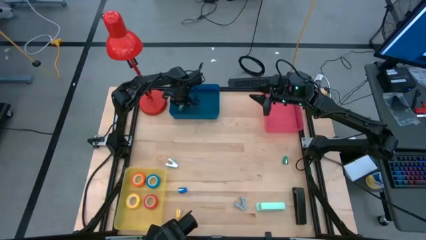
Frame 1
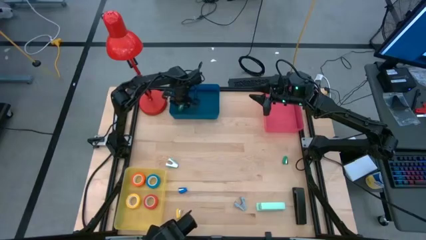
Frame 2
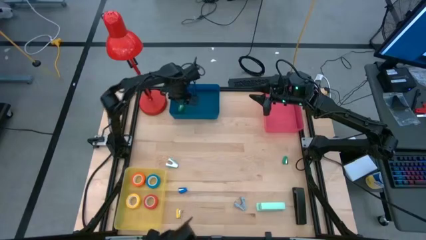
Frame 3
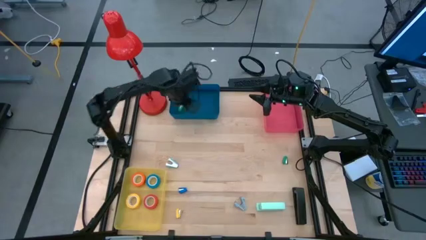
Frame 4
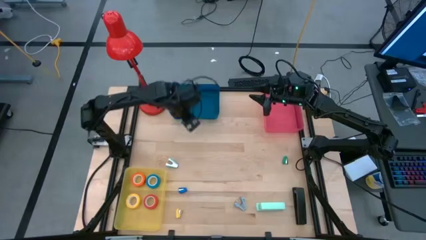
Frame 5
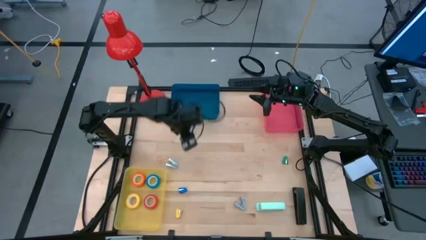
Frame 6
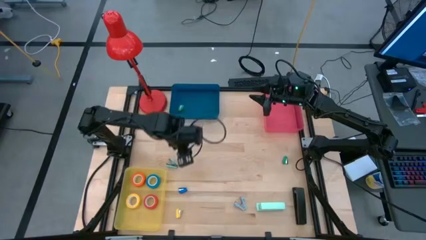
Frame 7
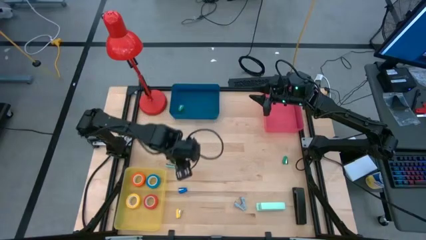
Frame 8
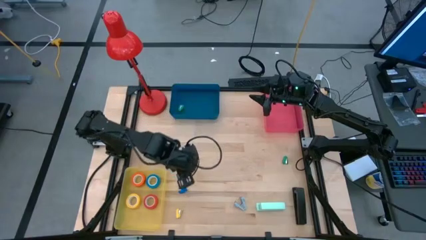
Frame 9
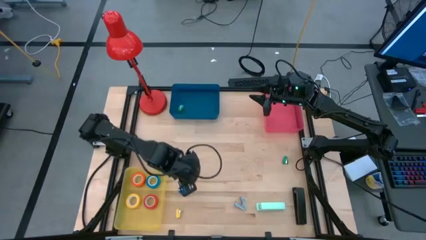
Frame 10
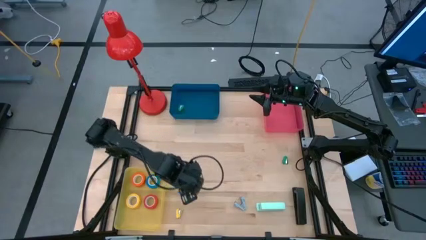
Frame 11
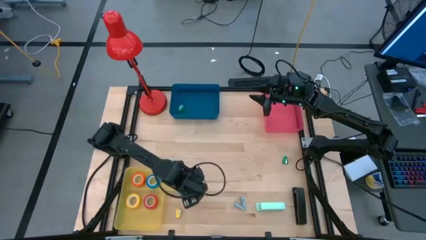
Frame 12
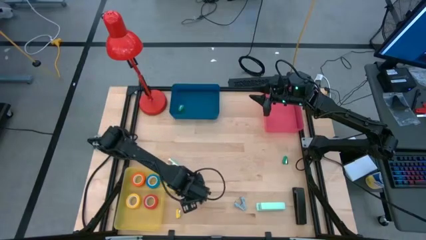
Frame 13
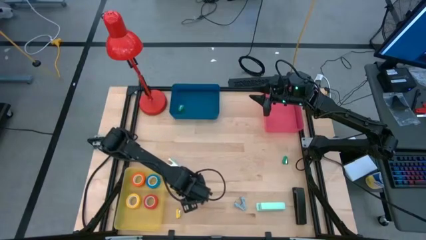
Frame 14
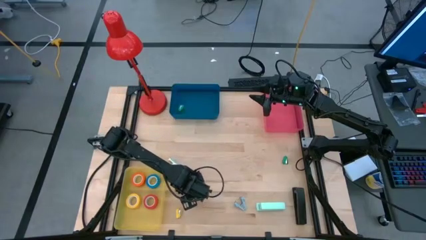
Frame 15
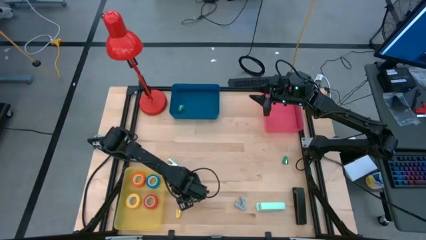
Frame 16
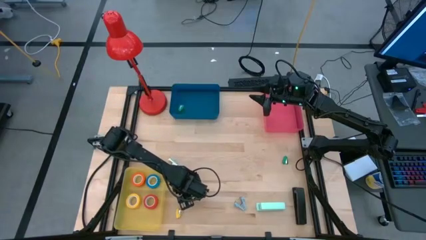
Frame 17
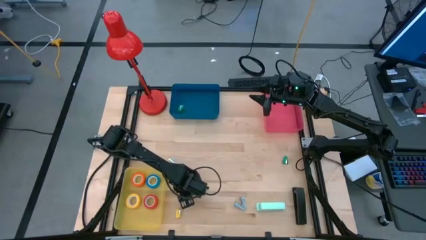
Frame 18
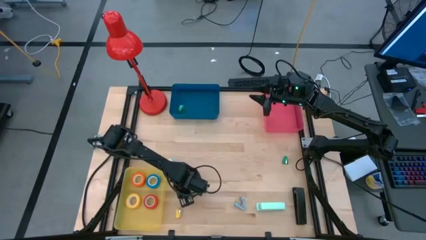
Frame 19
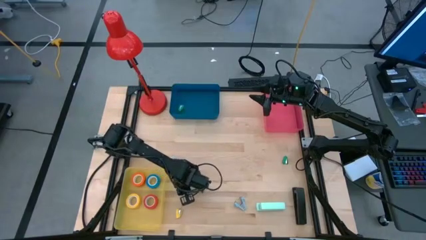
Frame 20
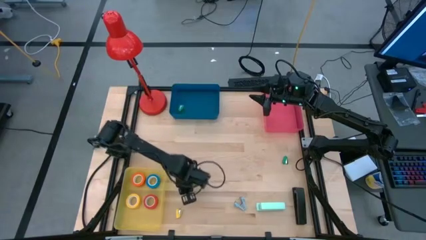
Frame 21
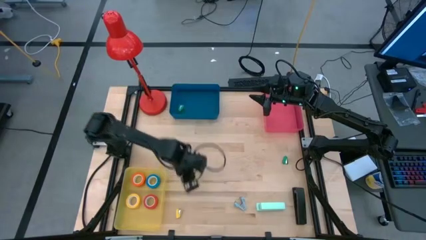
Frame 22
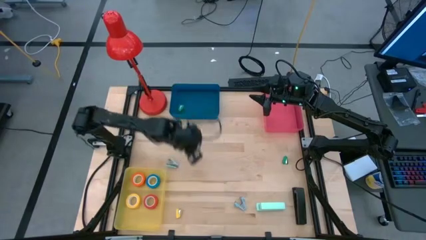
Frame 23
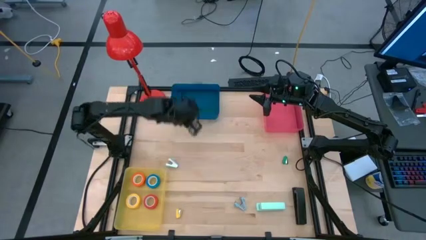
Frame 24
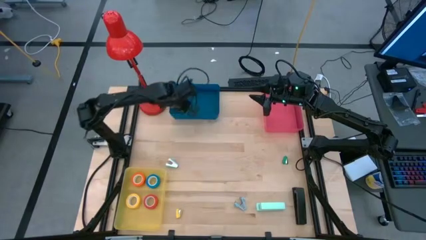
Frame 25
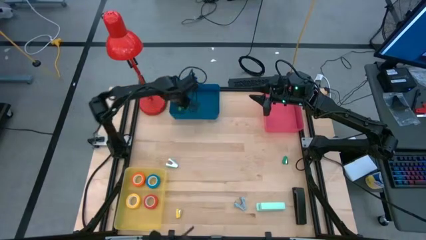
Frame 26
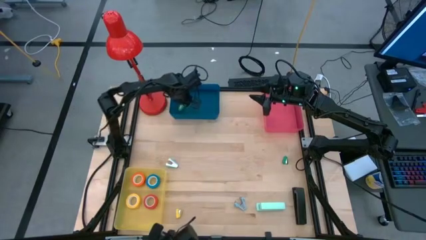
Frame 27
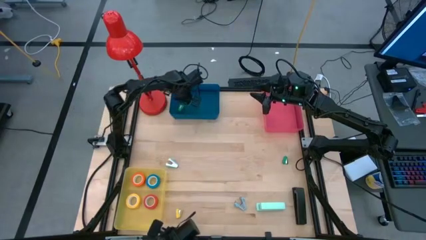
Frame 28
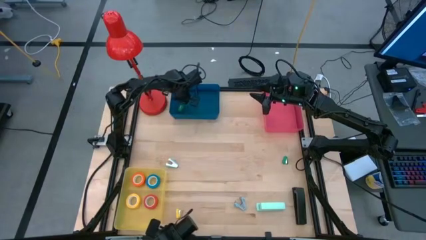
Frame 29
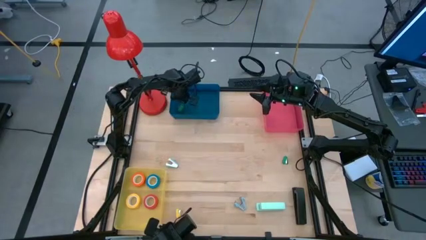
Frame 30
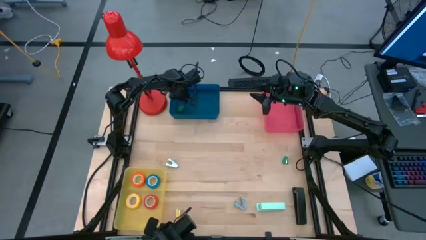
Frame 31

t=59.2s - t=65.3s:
Task: Pick and place Stapler, Stapler remover, tape
Put the blue stapler into the blue bin

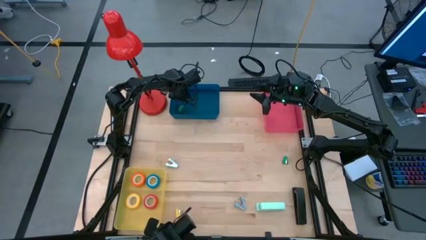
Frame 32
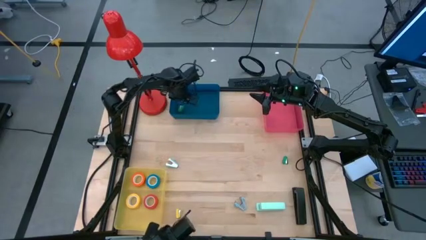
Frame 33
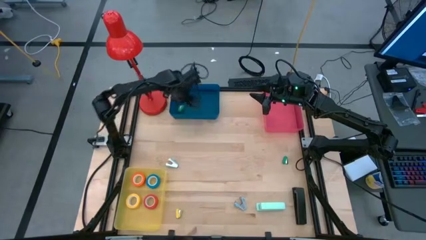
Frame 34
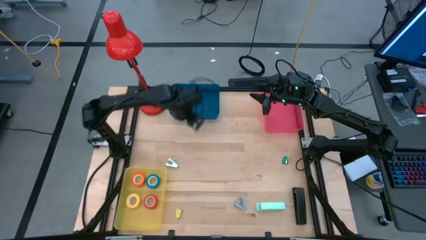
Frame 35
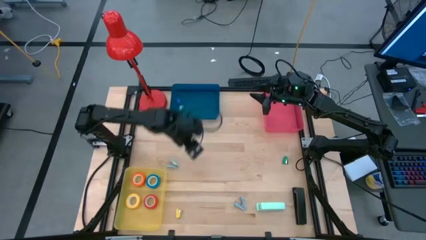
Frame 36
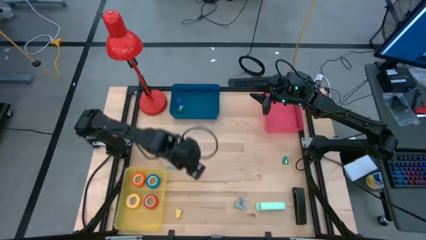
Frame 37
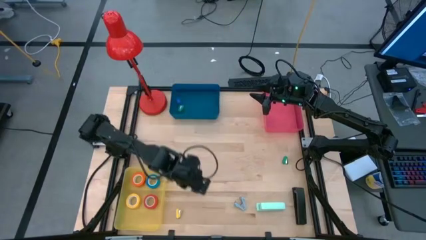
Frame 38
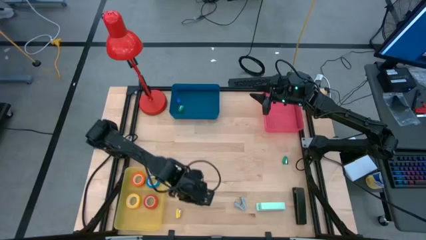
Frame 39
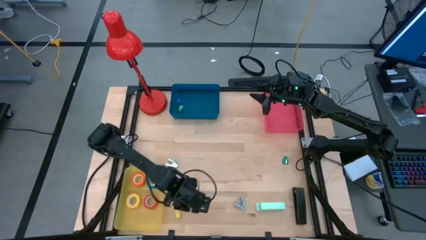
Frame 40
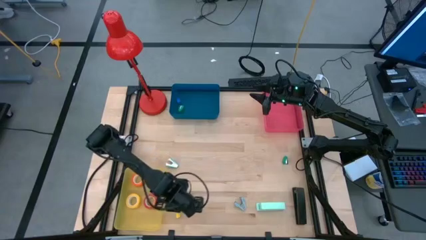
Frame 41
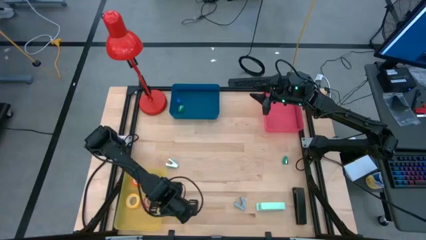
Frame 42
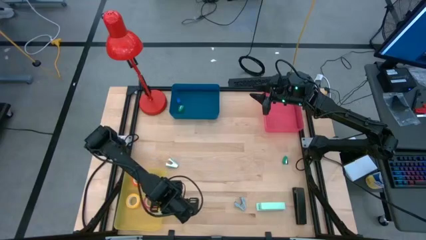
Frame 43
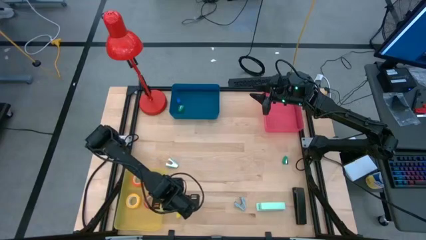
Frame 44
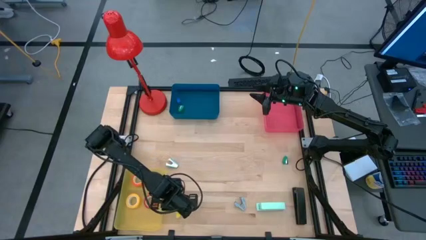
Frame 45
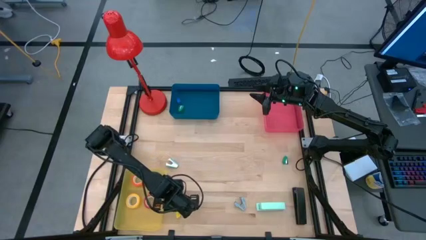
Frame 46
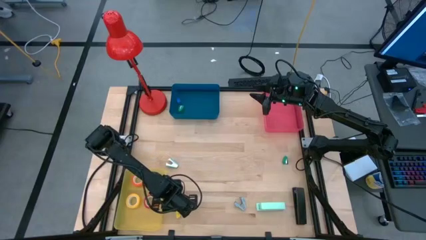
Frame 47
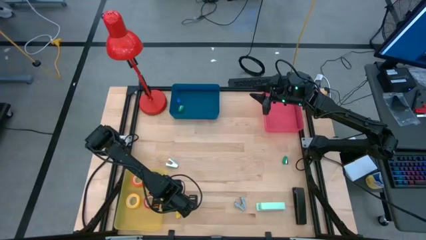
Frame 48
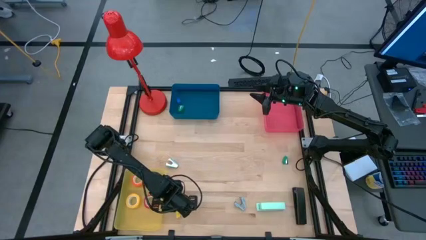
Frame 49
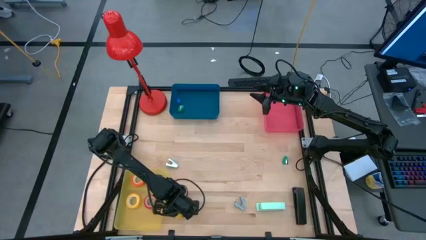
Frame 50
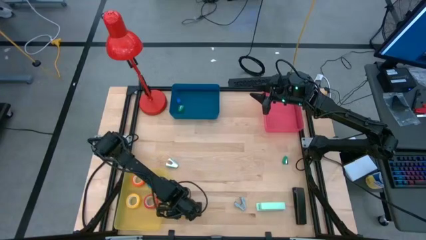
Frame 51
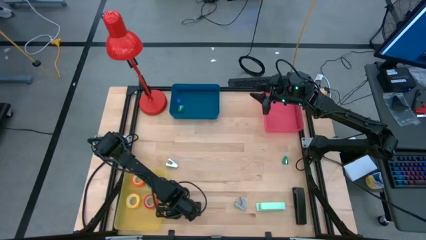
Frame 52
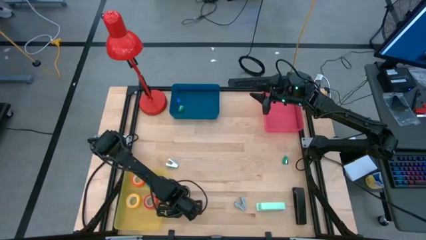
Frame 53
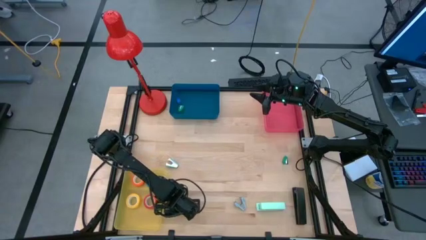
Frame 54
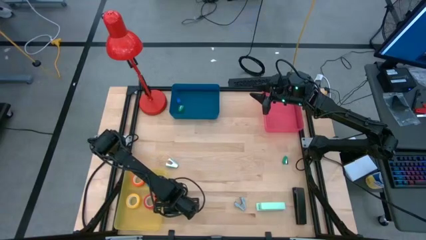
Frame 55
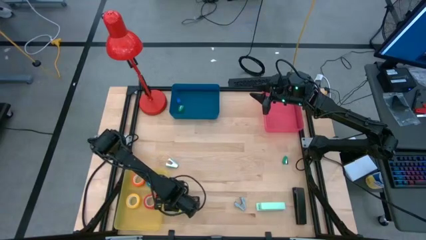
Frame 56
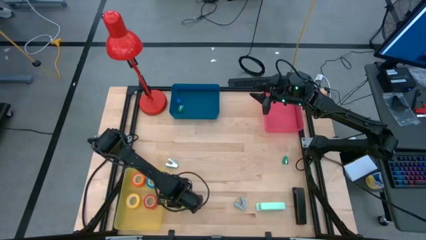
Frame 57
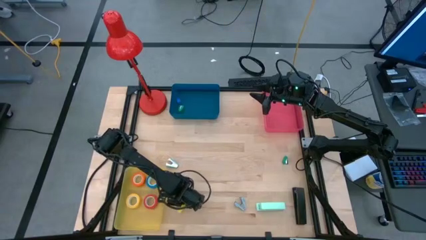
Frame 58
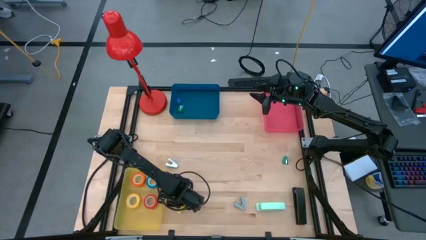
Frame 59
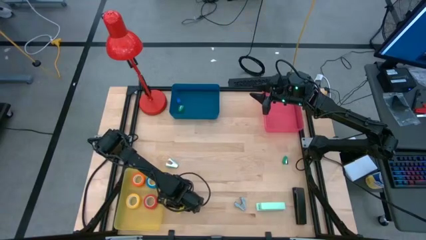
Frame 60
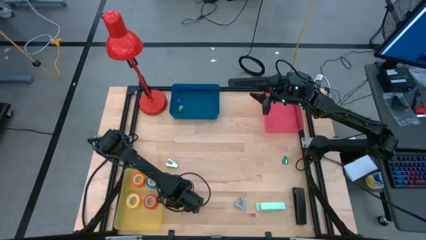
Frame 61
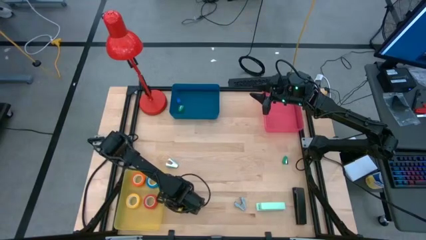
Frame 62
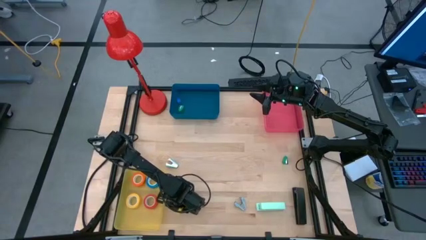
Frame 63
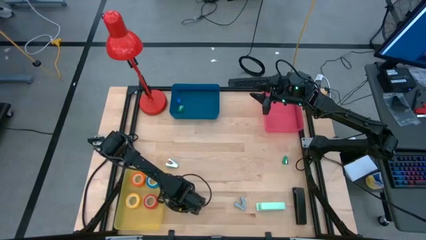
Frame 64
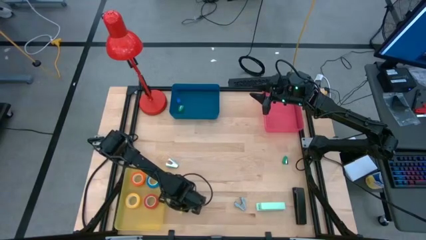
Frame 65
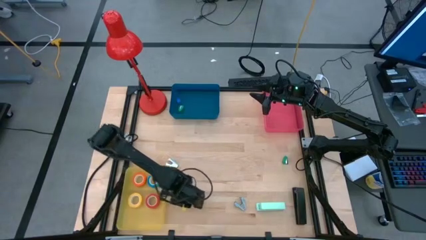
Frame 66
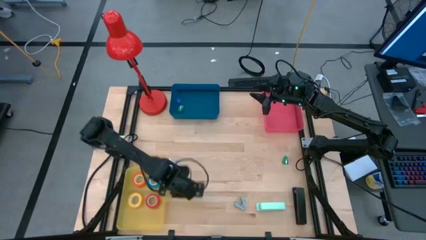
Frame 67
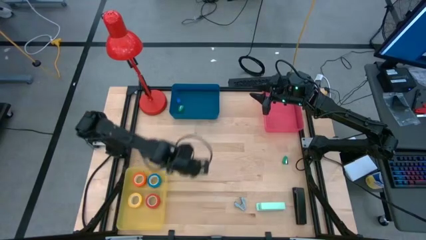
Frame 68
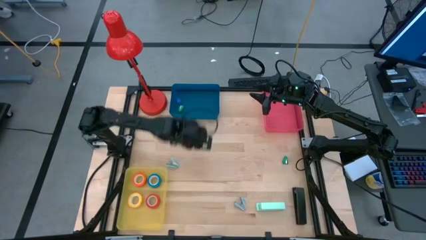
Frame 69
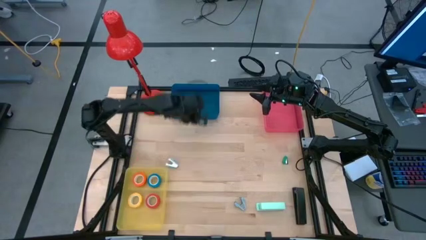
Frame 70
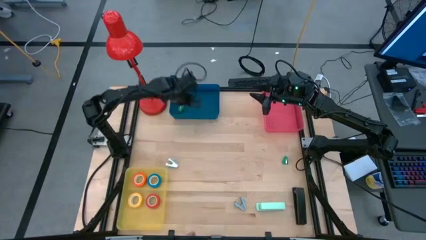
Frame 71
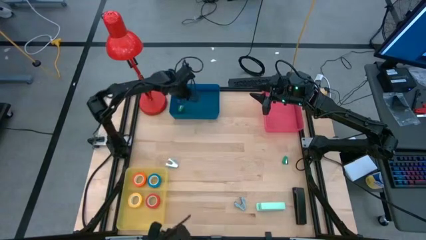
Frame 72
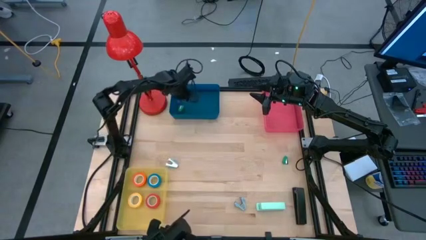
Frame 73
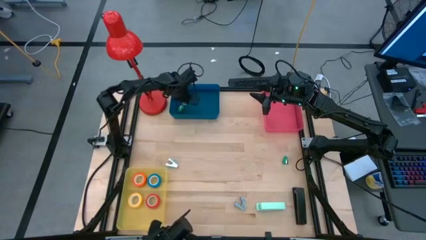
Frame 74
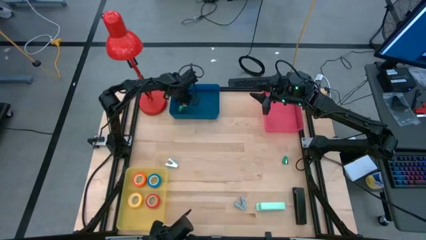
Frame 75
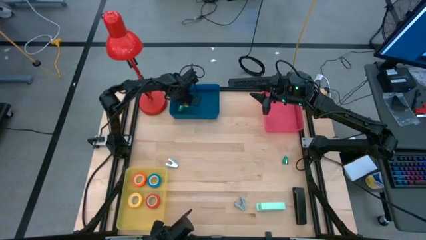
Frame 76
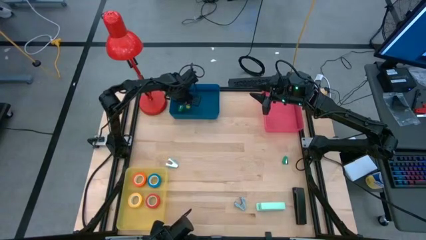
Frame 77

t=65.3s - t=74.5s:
Put the yellow stapler into the blue bin

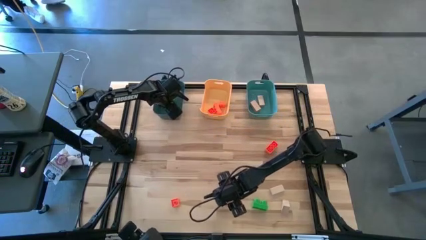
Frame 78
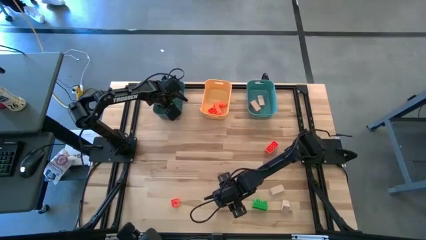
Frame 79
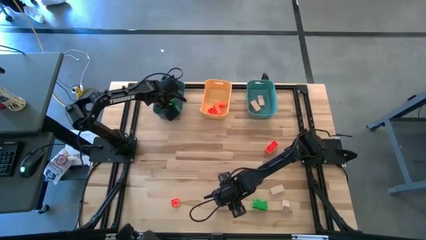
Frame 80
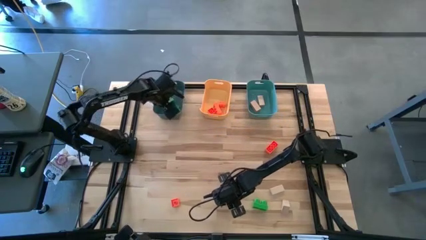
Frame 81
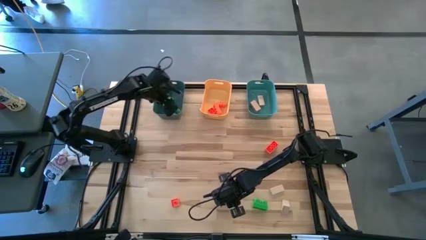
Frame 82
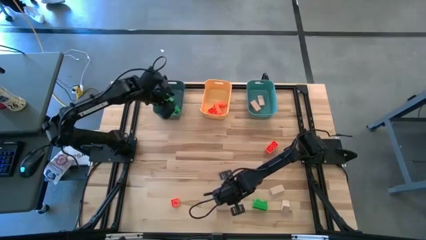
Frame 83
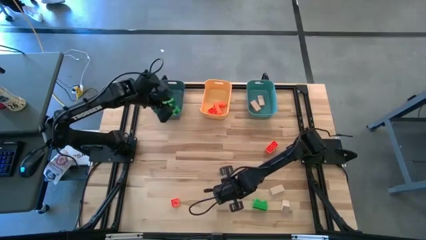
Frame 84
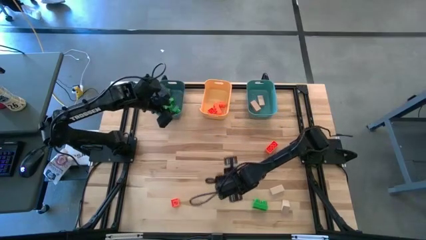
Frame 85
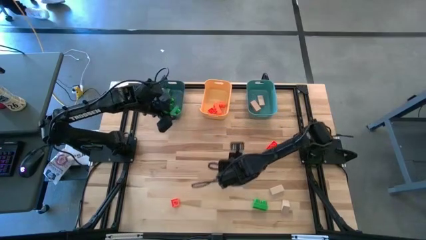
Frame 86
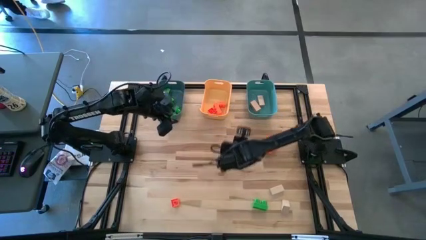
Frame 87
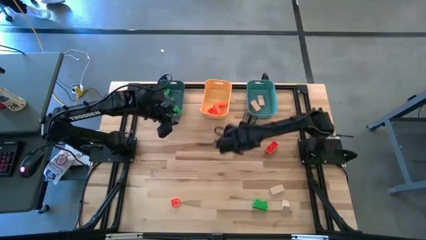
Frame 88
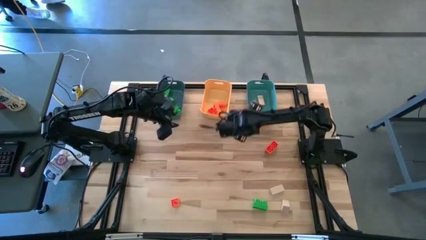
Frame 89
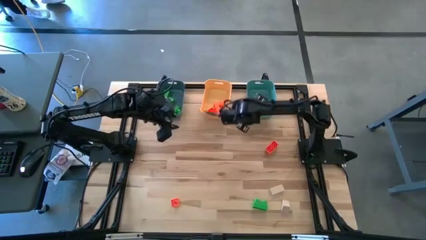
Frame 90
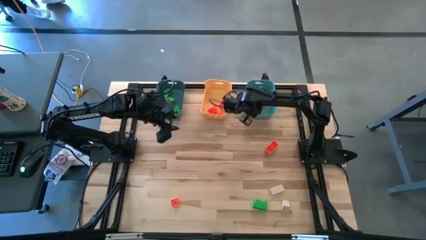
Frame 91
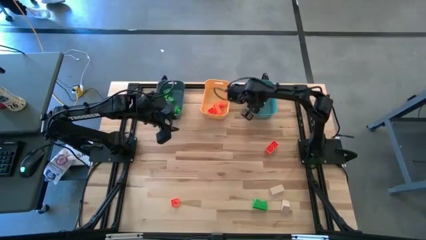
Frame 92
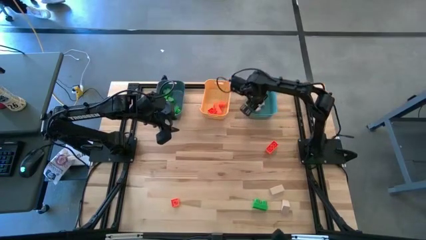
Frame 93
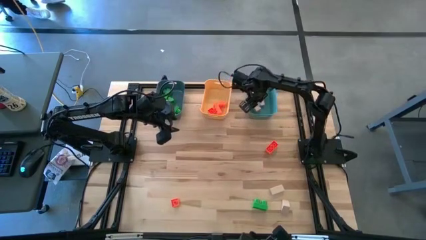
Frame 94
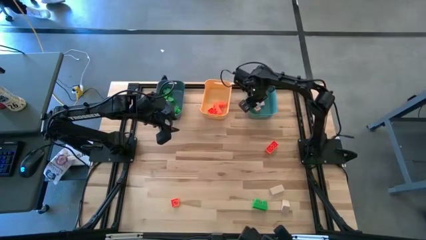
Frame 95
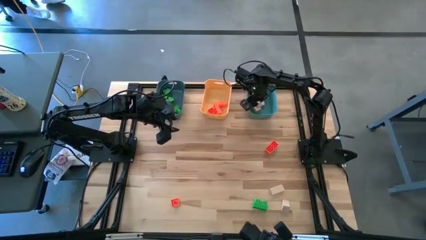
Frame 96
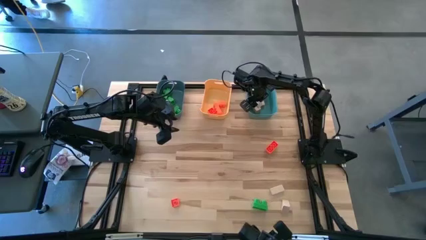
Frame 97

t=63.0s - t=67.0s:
Task: Sort & place blocks by color
Put the white block into the green bin
